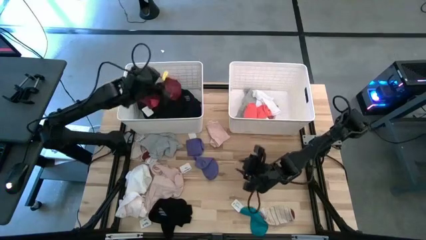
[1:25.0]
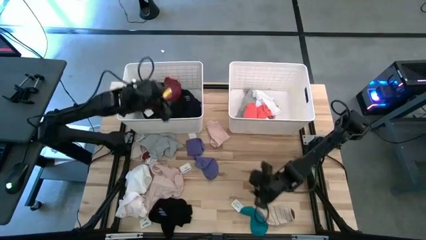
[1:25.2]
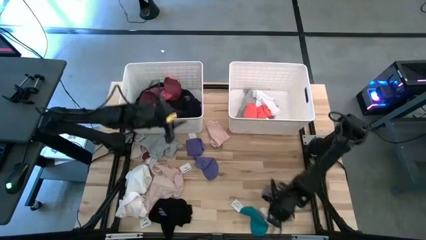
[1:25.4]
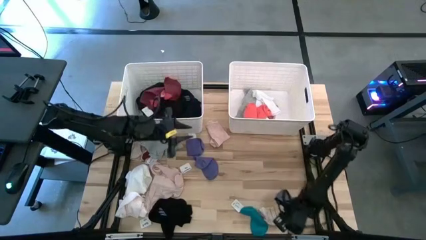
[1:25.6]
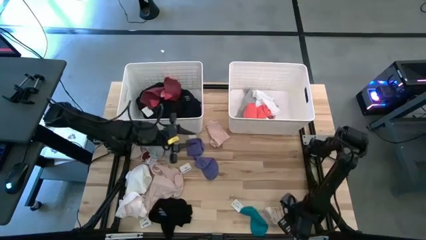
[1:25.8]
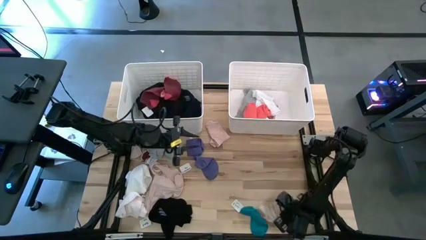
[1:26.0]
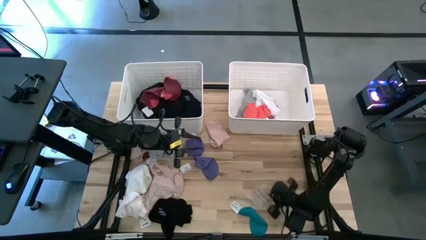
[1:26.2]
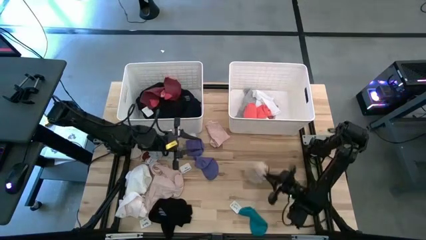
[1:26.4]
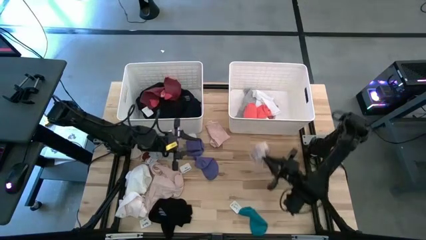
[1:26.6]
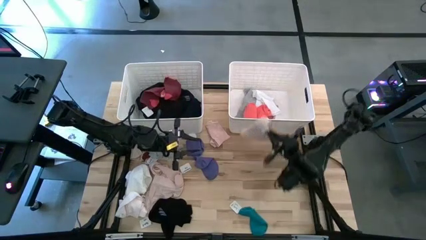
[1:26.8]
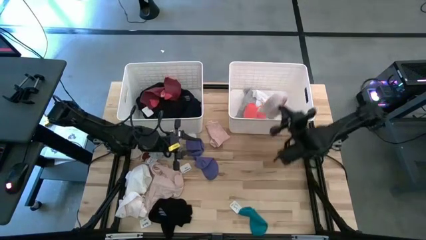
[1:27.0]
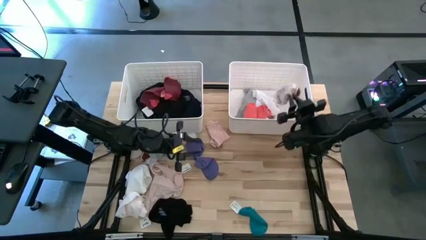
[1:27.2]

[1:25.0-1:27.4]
Task: Sort clothes
Put the gray patterned sock into the right white laundry bin

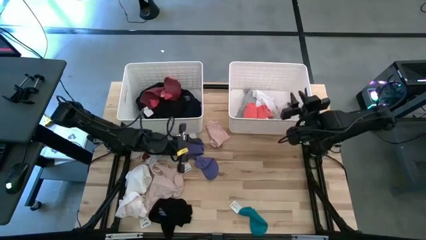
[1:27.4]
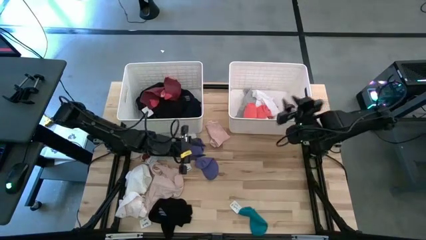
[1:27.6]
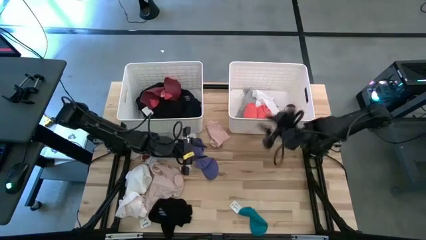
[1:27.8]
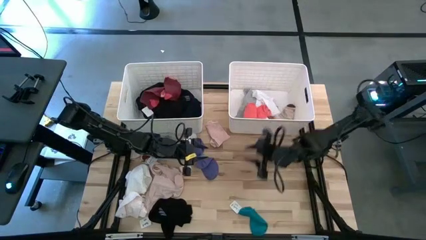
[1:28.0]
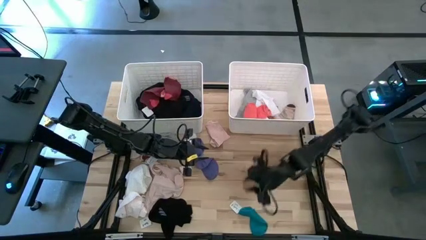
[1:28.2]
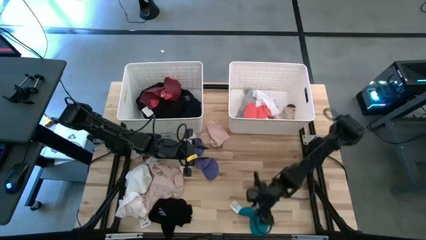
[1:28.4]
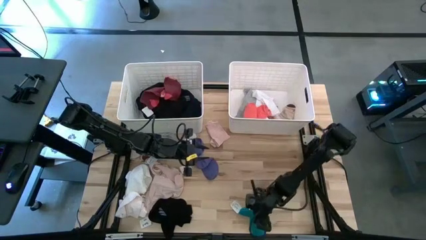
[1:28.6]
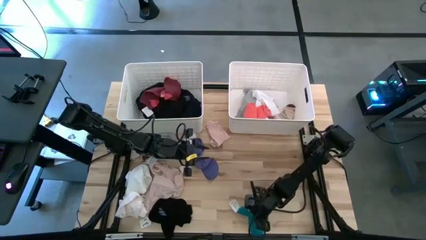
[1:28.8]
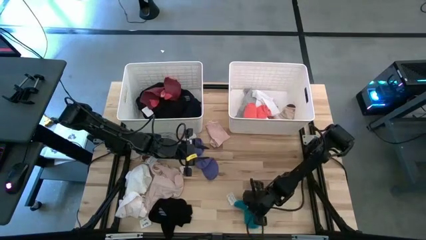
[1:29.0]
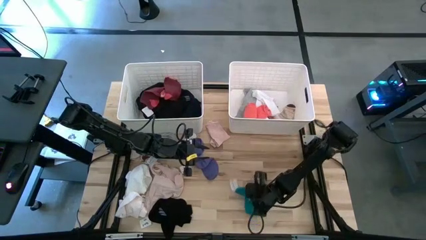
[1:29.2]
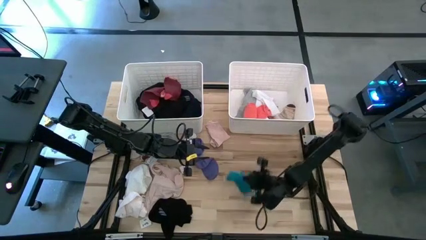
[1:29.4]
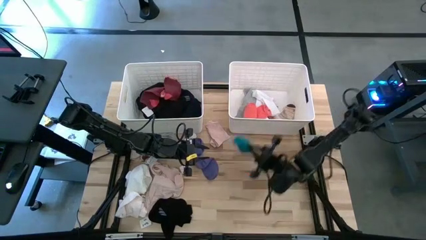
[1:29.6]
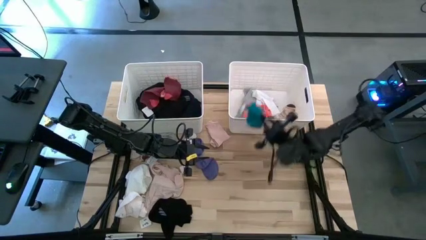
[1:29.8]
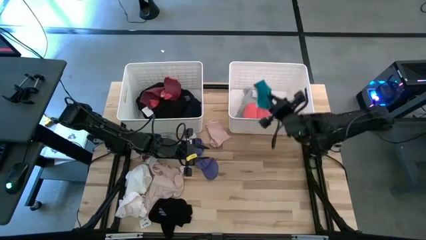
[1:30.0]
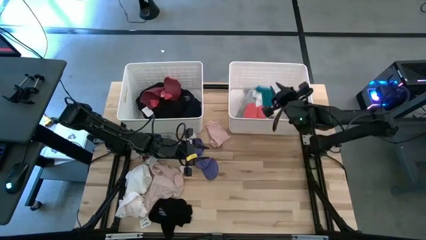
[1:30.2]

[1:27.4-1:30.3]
Put the blue sock into the right white laundry bin

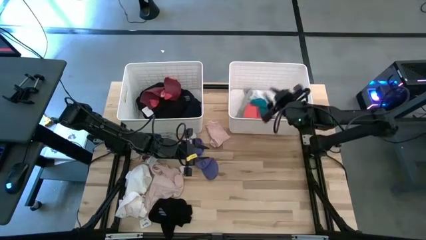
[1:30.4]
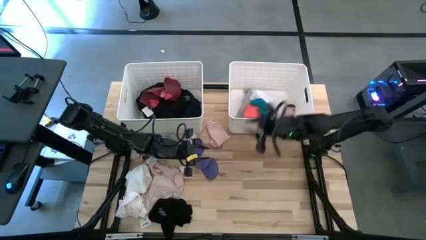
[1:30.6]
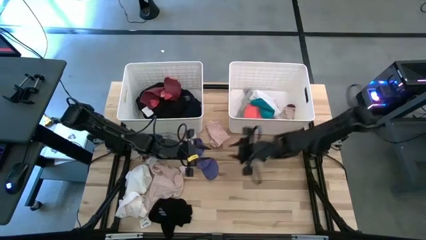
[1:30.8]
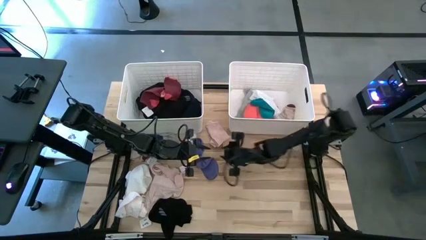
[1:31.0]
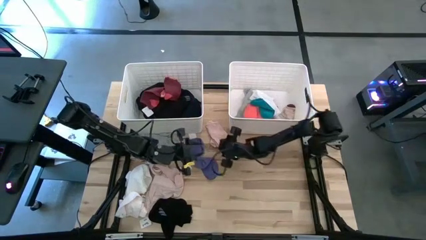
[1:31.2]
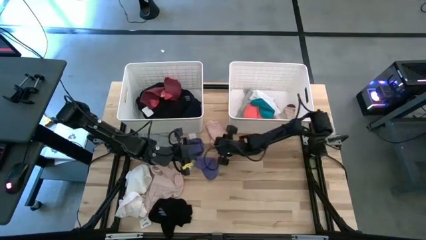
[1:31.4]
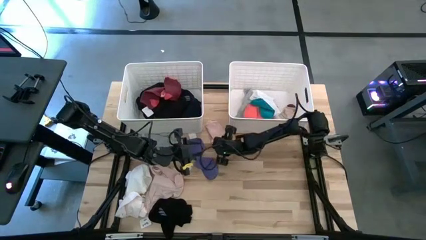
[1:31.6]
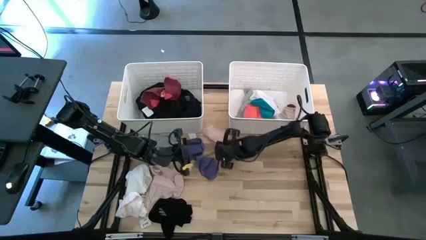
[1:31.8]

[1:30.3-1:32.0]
Put the light pink sock into the right white laundry bin

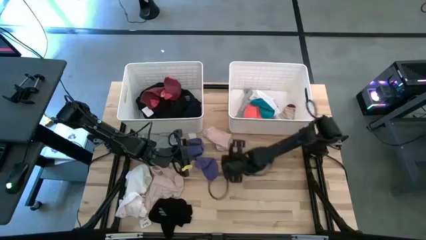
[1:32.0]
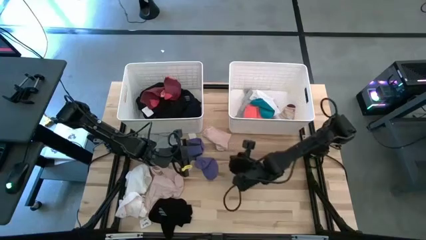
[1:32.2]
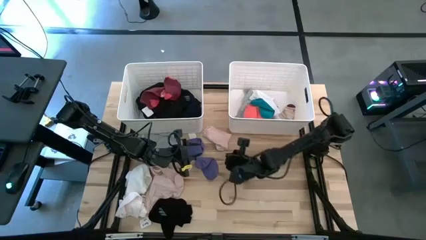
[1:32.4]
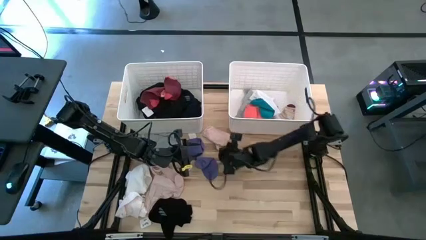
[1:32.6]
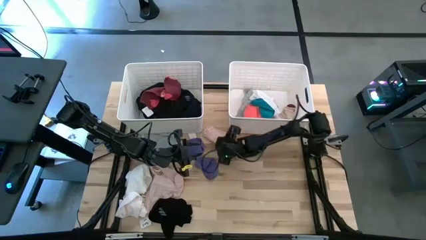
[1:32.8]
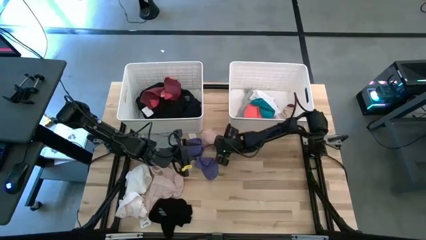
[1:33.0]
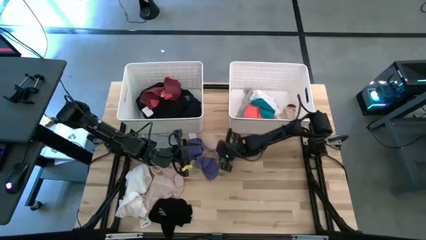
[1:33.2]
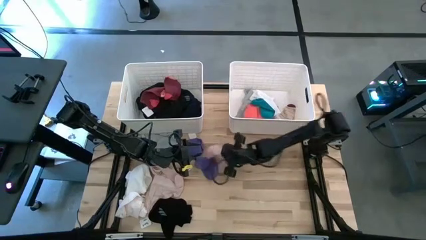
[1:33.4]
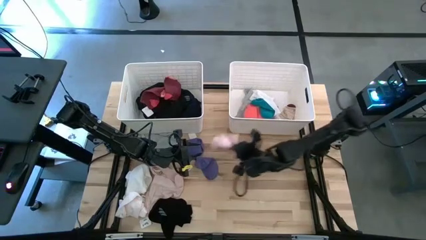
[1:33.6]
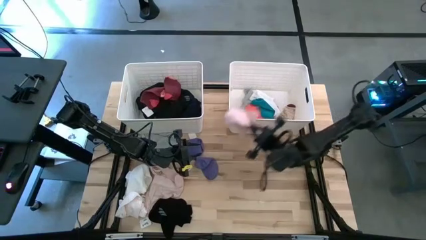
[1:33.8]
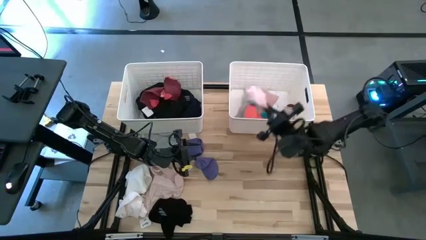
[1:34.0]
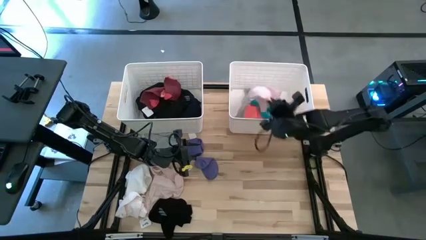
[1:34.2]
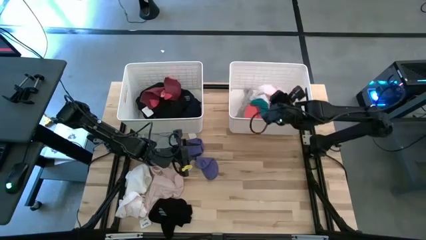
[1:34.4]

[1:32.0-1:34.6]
Put the light pink sock into the right white laundry bin

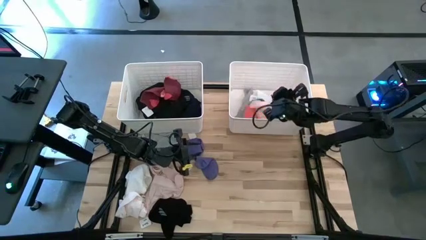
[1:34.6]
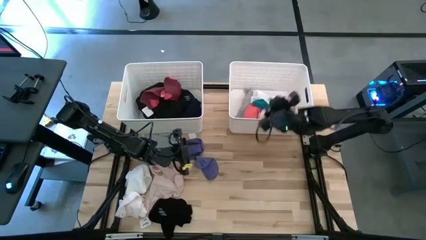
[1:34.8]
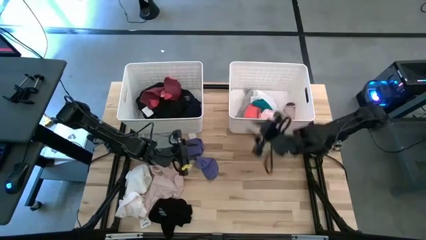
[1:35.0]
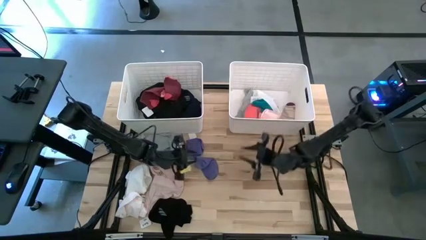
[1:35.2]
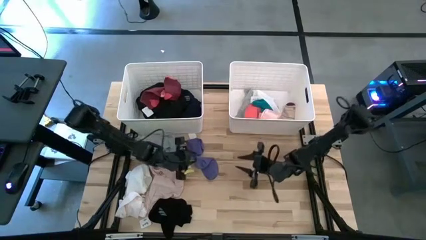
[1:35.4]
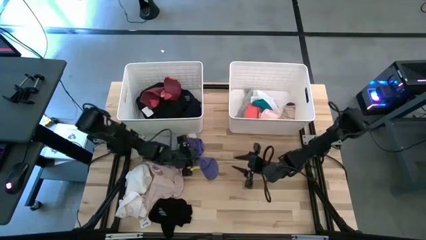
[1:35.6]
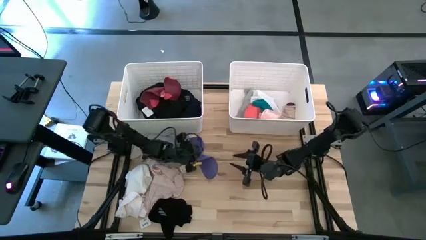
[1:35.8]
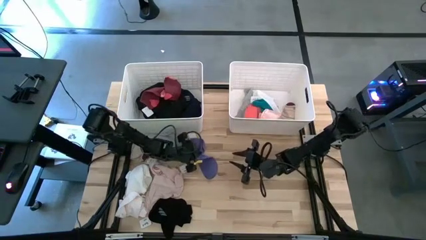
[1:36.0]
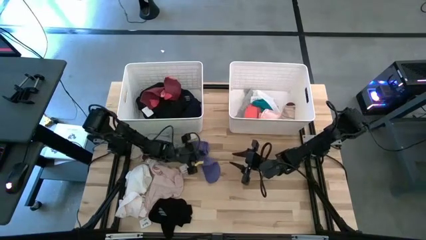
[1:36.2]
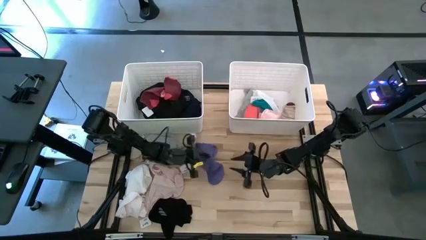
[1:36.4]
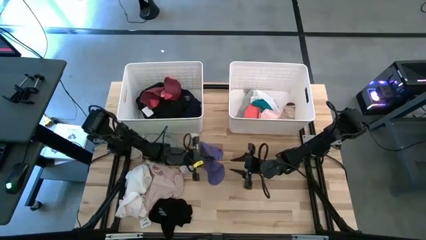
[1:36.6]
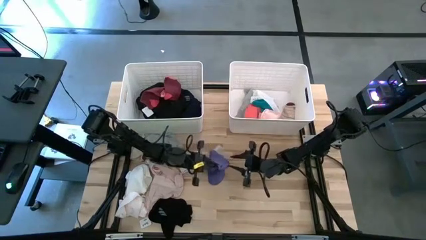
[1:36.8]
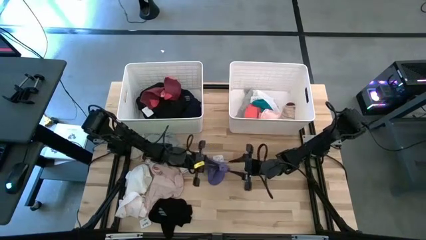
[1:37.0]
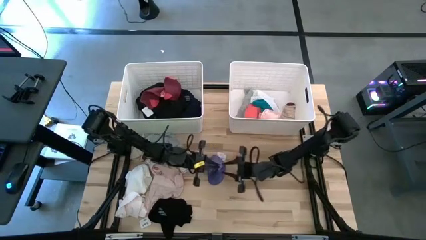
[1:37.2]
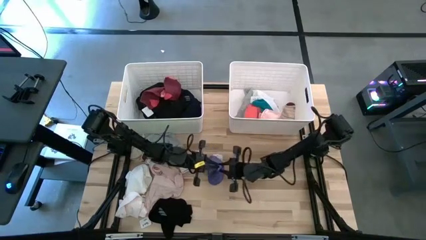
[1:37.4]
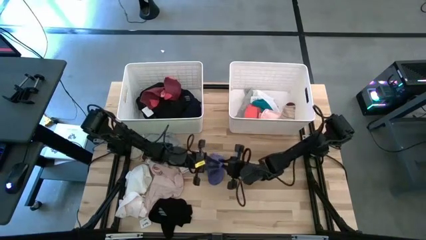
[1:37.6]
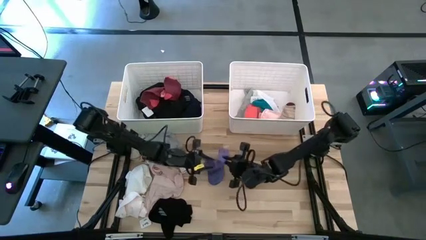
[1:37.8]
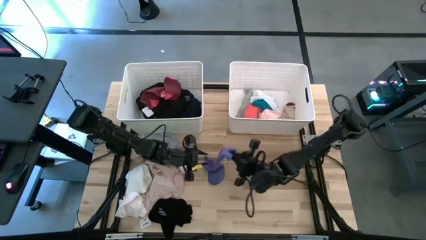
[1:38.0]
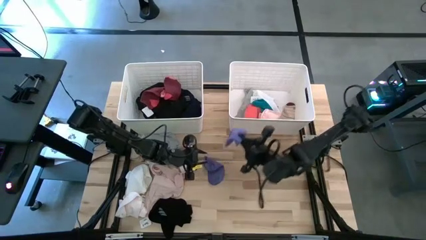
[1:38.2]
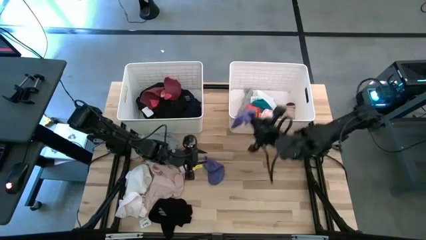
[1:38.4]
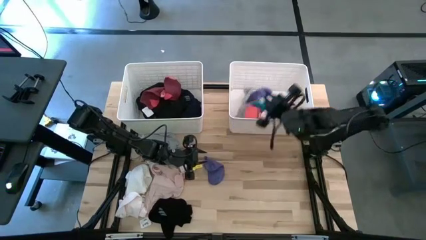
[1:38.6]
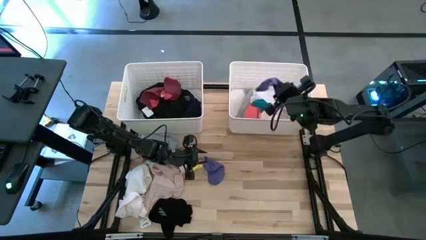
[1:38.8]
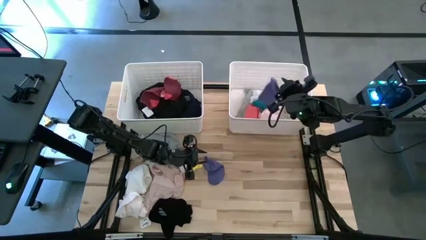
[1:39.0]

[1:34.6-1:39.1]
Put the violet sock into the right white laundry bin

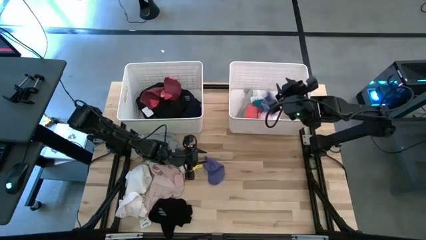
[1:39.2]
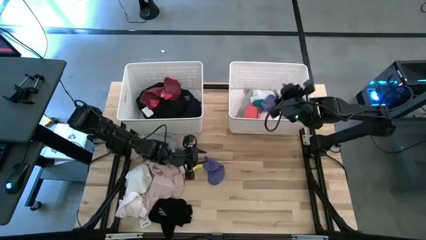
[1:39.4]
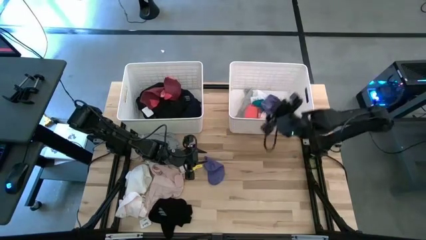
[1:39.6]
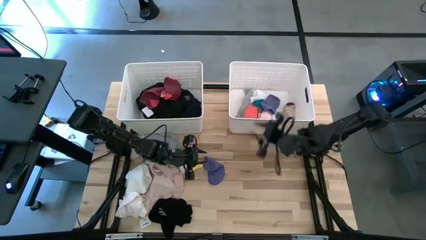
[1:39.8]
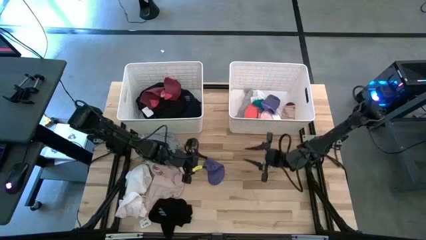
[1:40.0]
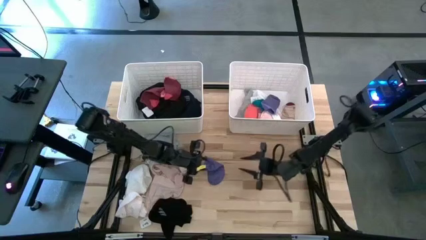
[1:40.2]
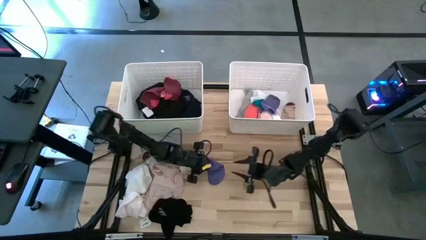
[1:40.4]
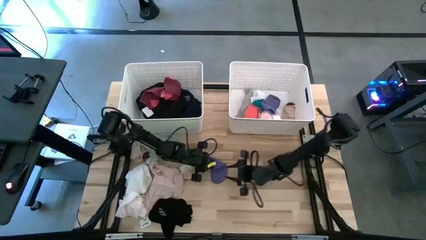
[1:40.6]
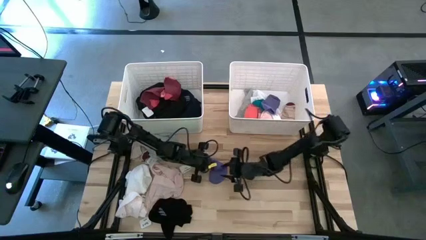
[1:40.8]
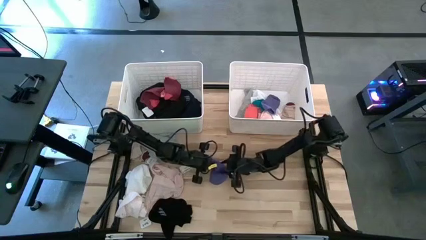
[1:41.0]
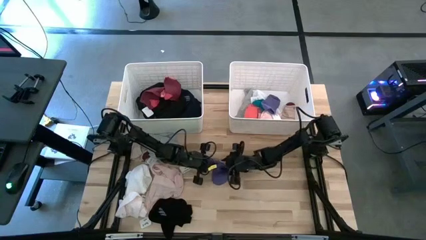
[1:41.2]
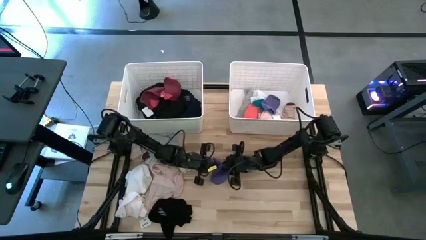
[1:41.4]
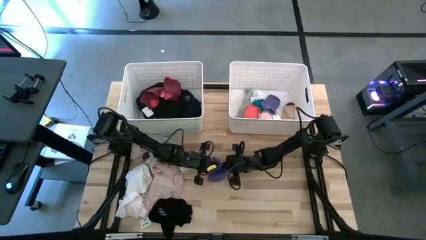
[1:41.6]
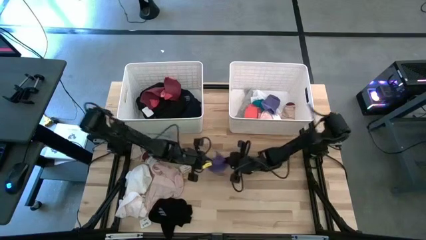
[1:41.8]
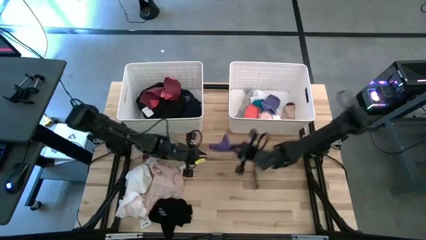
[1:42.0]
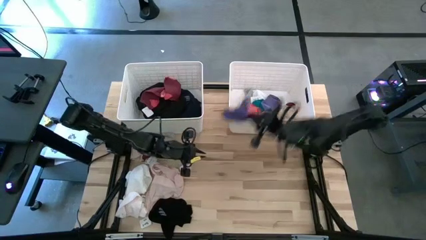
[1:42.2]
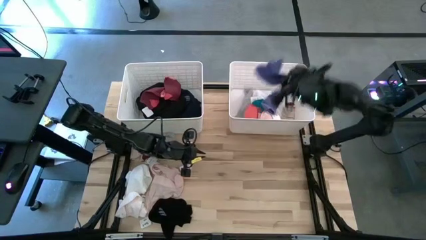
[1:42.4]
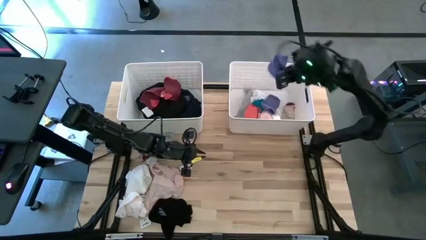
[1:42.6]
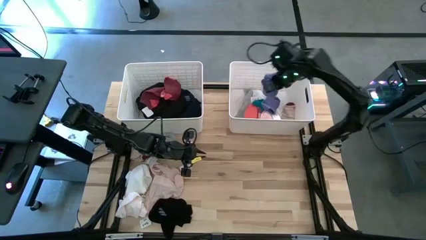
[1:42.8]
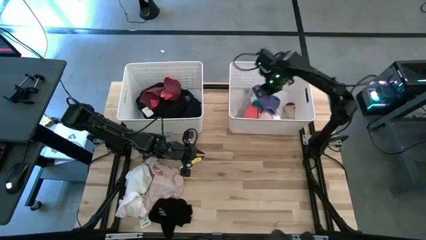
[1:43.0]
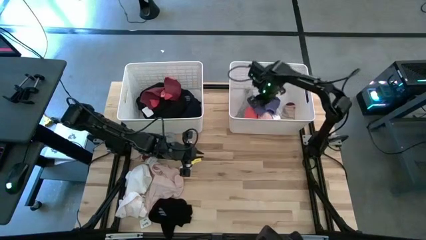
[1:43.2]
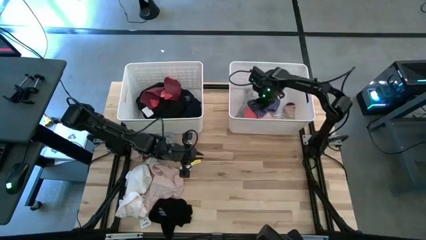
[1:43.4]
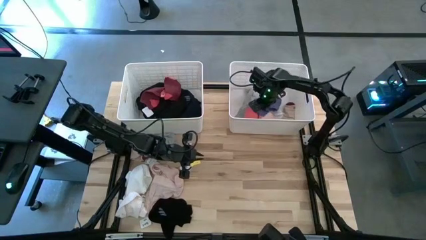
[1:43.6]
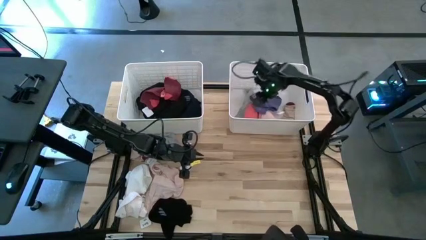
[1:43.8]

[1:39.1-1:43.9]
Put the violet sock into the right white laundry bin
